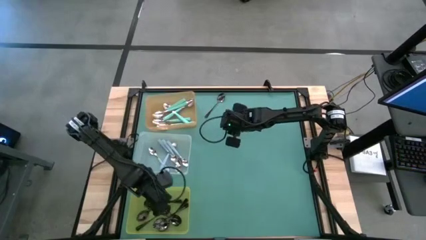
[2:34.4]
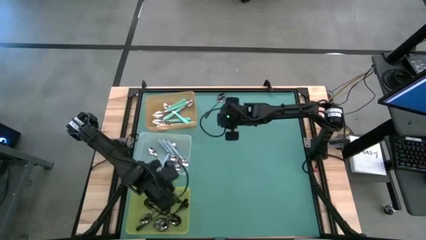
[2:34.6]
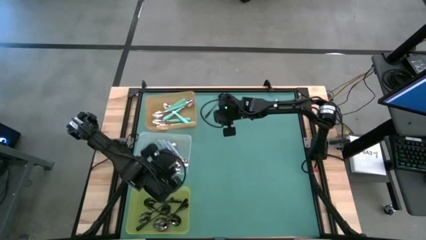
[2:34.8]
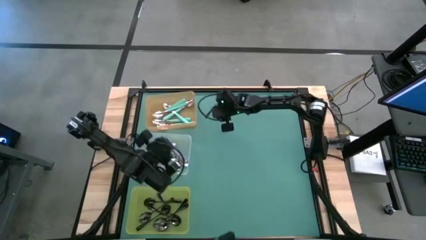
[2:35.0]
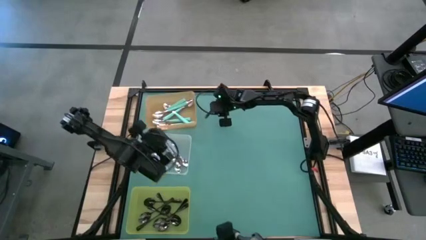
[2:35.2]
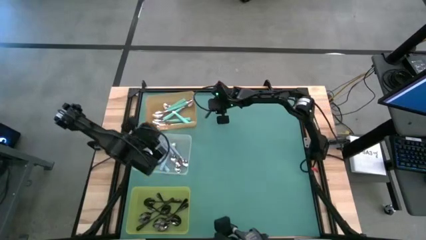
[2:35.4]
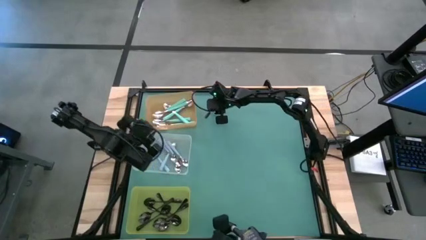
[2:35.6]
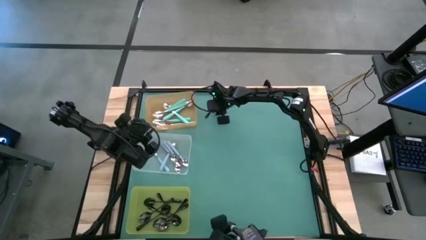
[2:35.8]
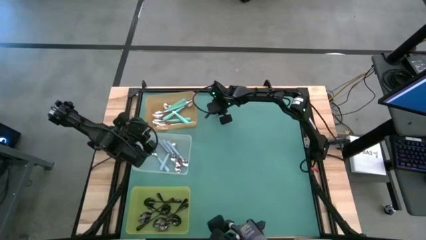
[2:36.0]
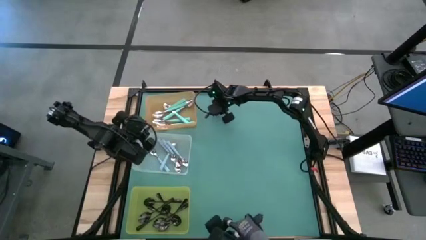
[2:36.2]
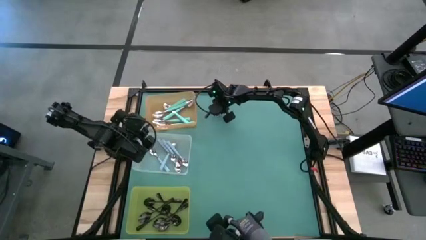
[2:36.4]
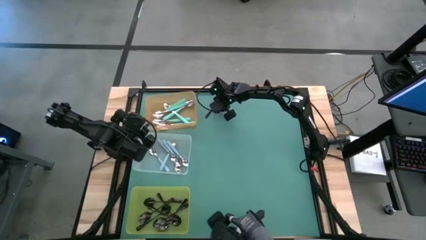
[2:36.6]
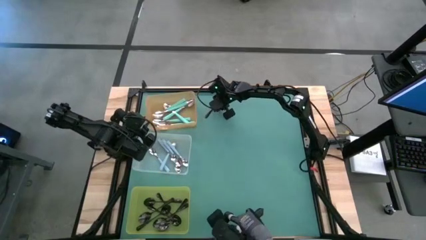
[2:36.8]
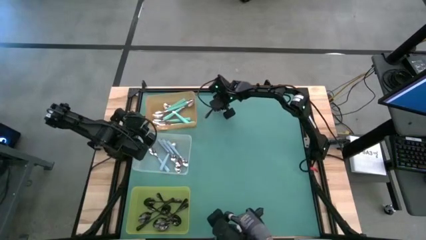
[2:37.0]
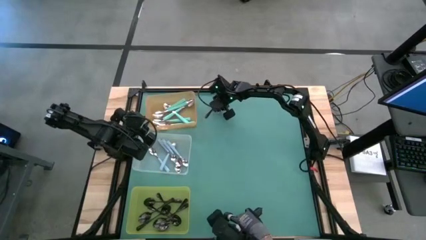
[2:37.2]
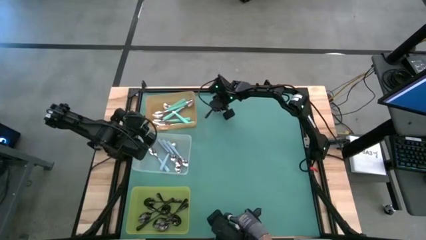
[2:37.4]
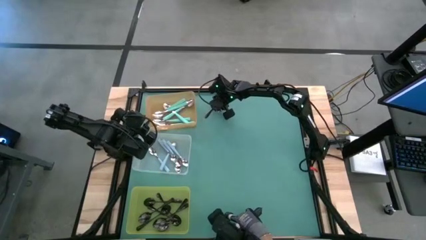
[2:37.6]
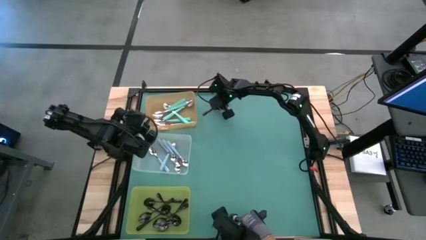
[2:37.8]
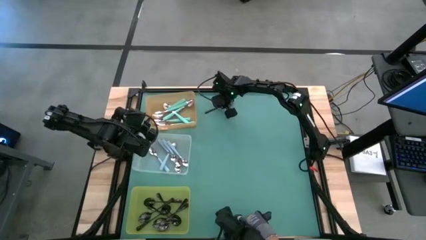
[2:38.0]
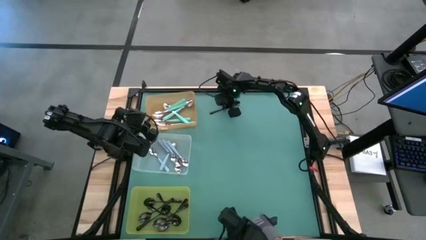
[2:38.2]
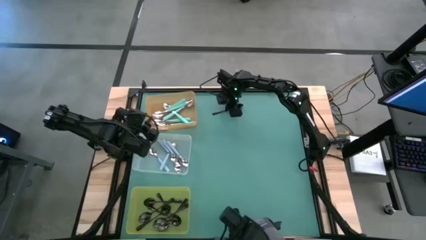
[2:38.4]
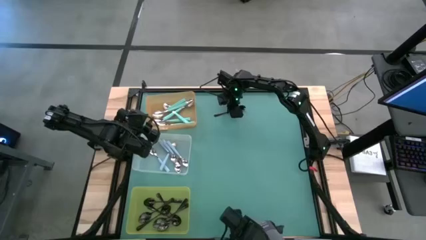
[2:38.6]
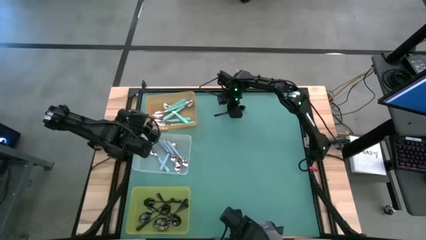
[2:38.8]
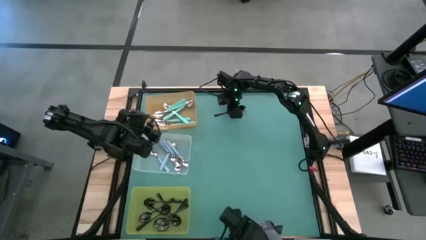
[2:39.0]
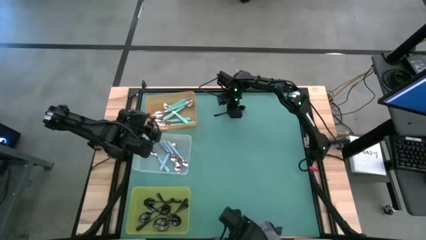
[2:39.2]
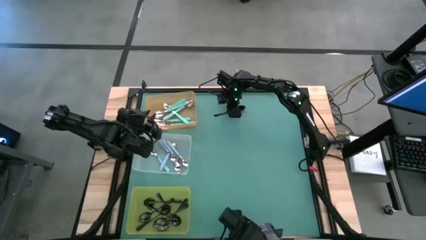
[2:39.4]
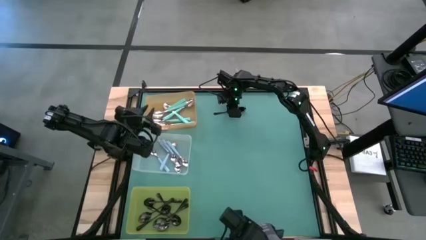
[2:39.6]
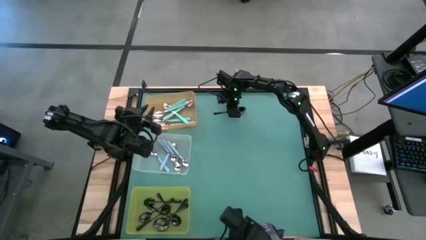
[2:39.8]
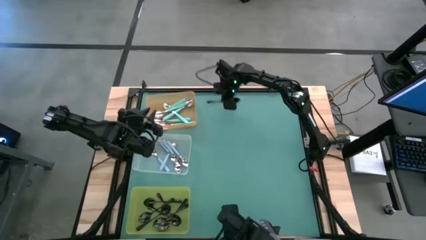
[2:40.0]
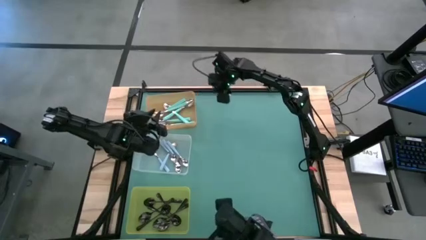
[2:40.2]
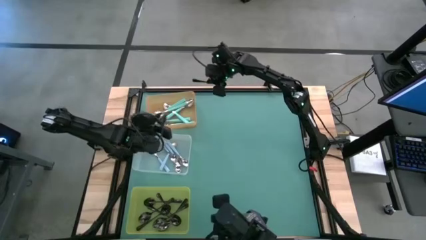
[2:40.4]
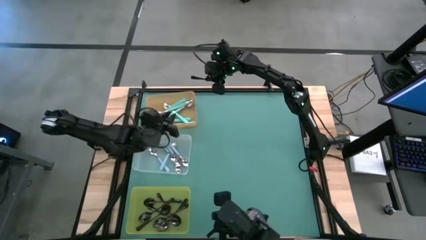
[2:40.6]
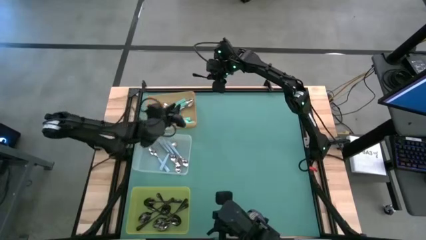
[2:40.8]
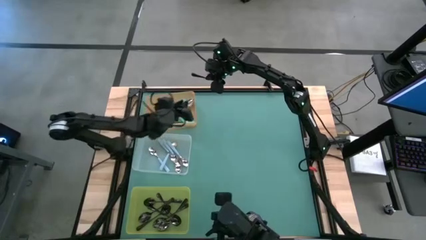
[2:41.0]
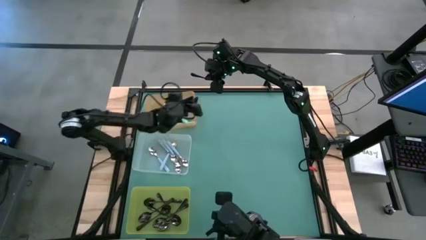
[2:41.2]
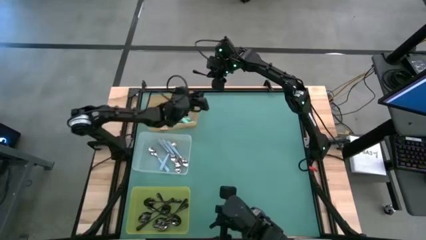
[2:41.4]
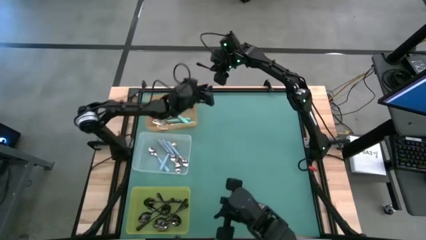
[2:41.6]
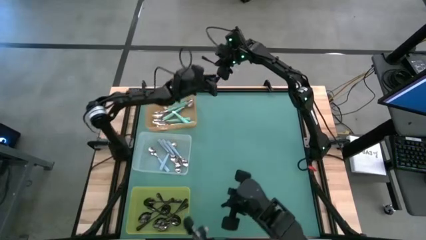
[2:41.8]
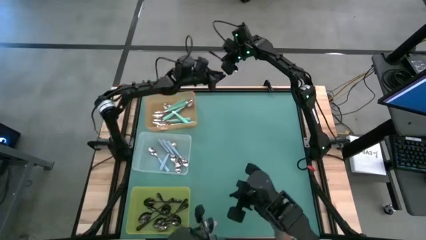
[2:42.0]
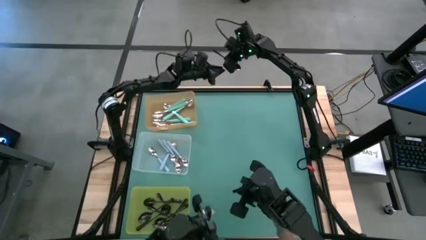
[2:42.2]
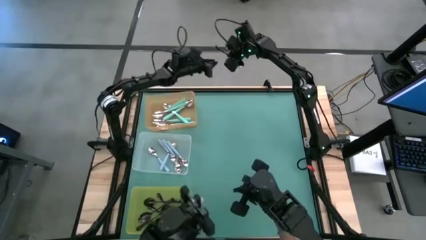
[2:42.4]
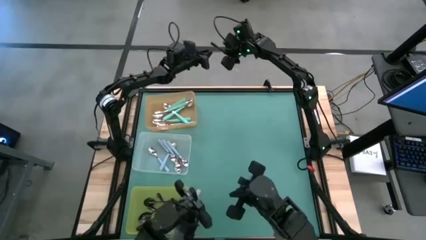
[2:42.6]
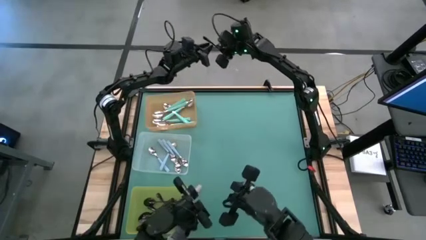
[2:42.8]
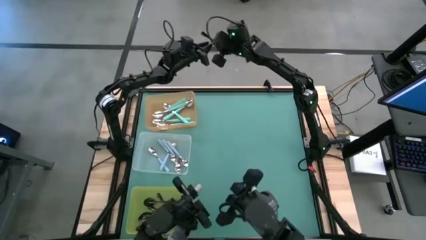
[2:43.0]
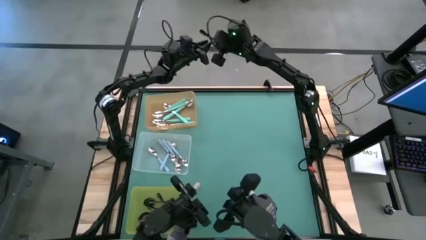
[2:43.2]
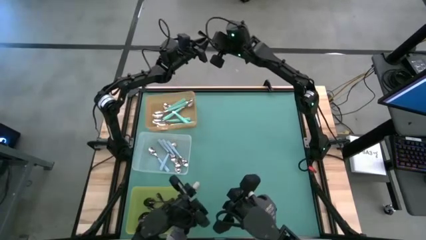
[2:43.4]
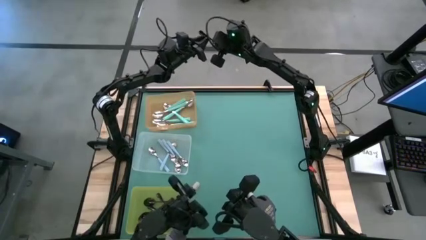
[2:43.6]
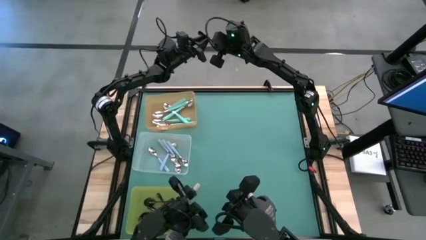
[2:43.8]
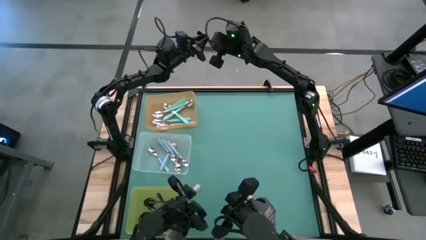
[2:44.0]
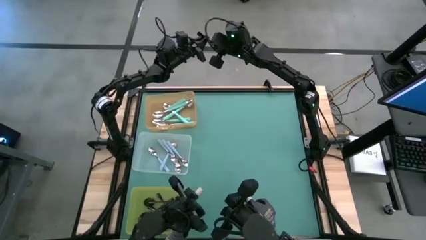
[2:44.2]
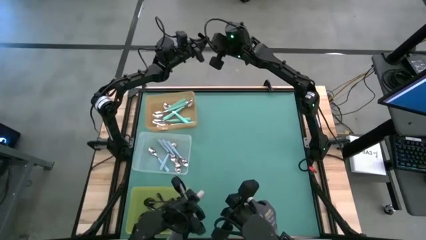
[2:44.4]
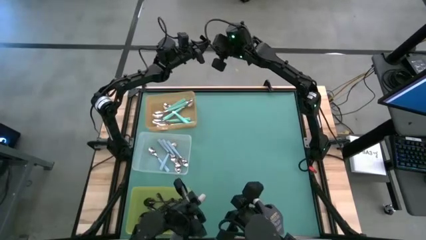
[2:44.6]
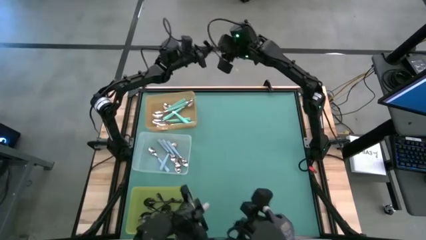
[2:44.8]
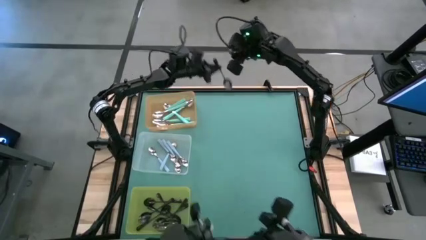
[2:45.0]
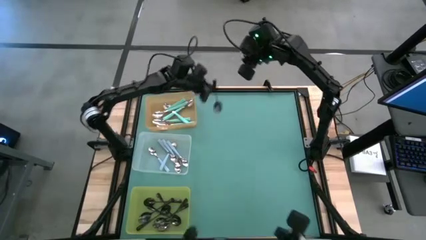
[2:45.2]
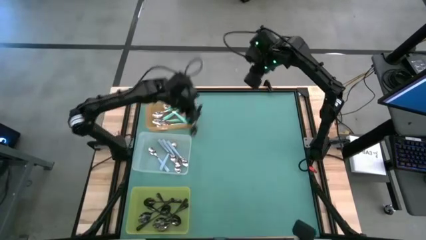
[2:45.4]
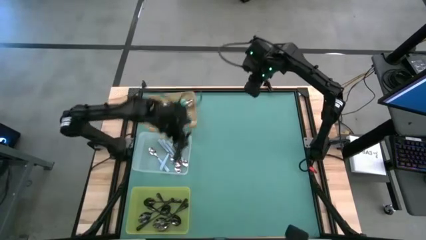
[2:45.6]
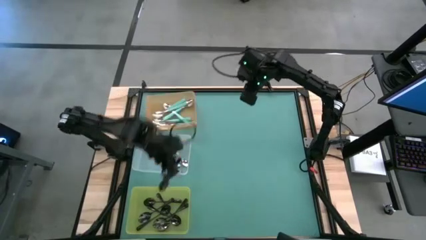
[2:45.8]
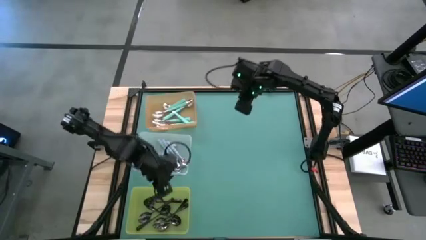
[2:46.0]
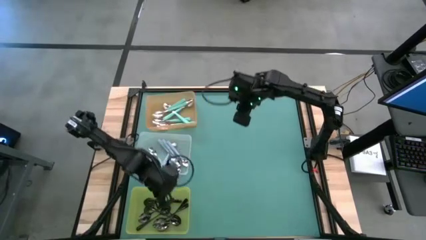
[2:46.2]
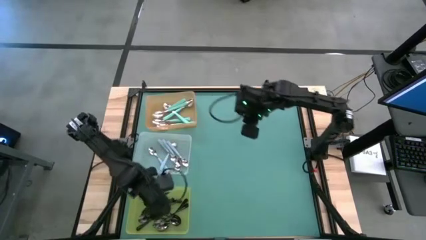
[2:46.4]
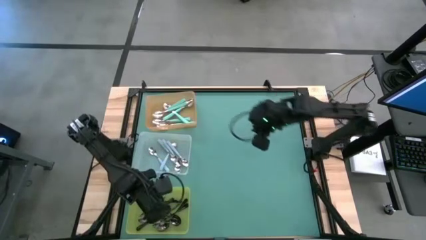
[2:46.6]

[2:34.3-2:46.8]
Task: Sort silverware by color (type)
Put the black spoon into the yellow bin
